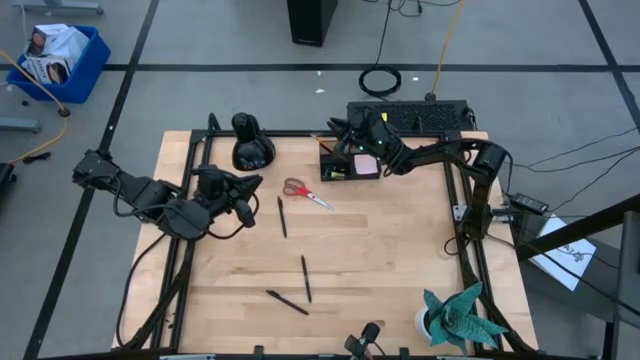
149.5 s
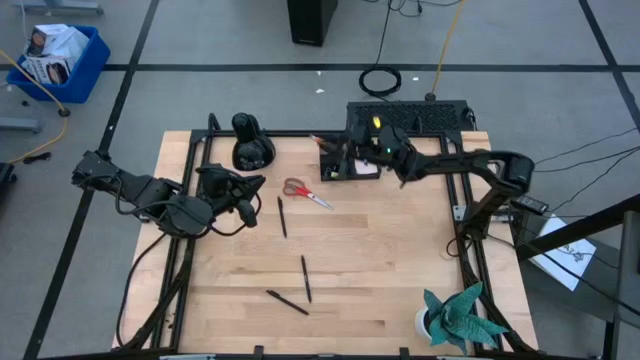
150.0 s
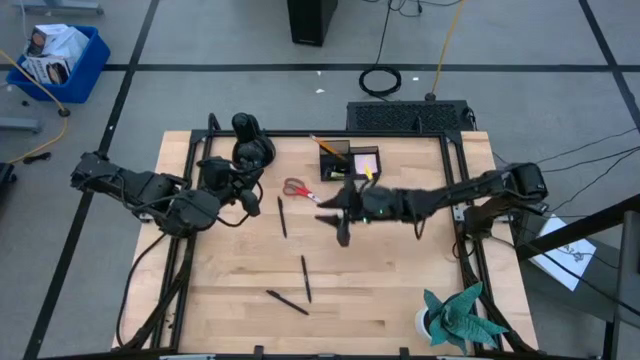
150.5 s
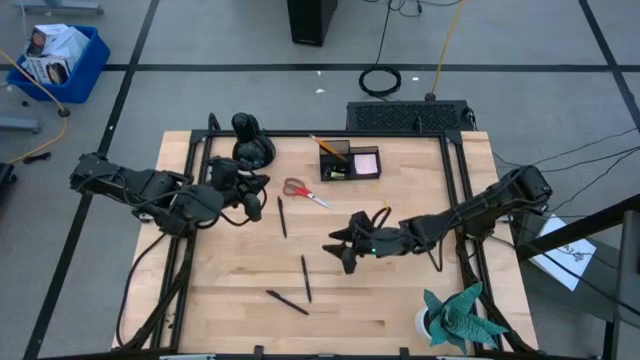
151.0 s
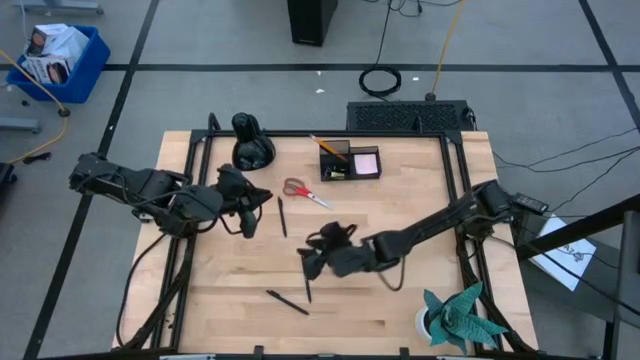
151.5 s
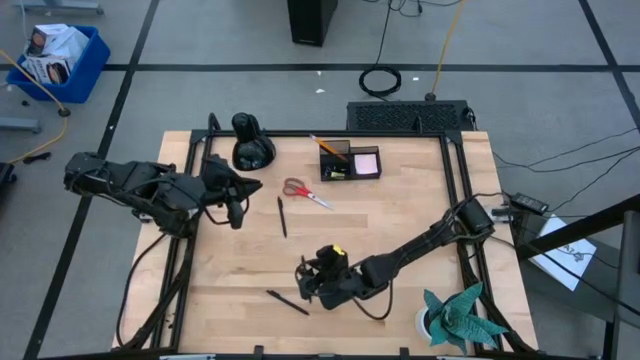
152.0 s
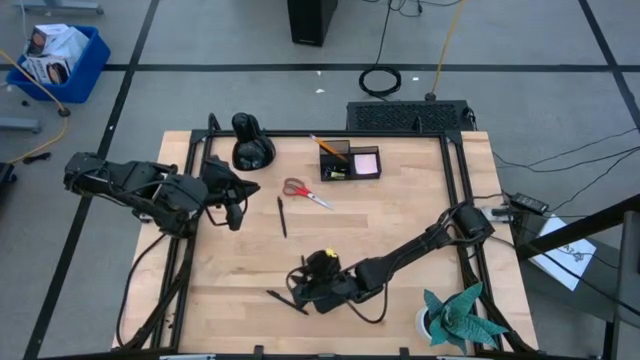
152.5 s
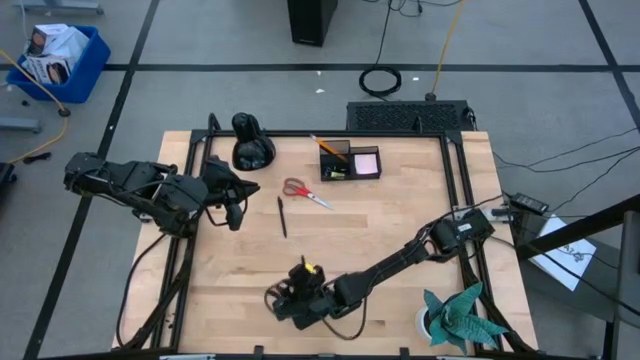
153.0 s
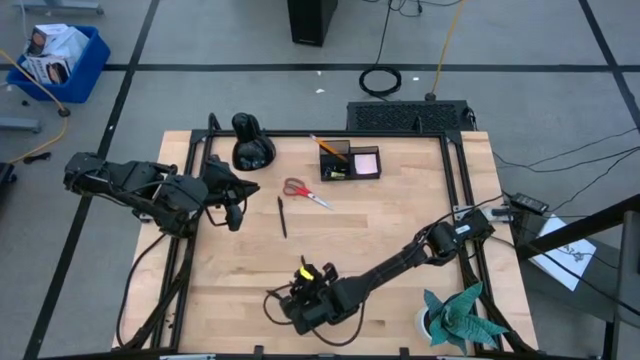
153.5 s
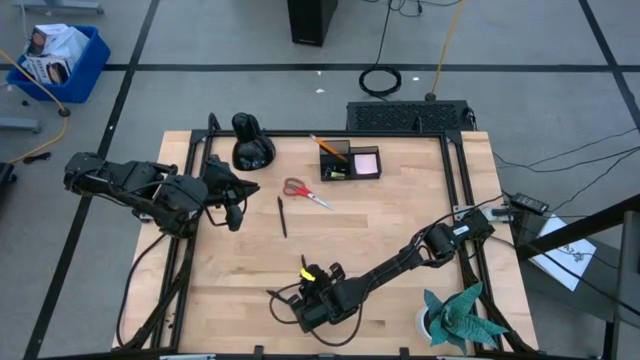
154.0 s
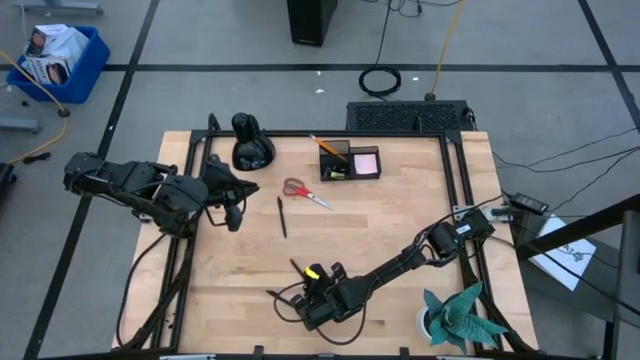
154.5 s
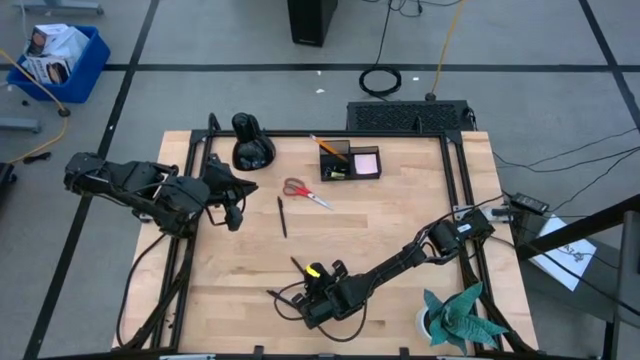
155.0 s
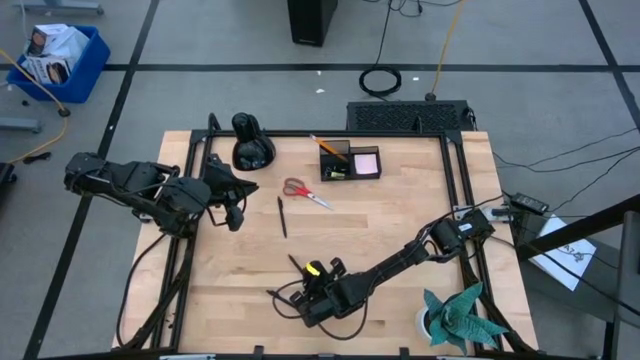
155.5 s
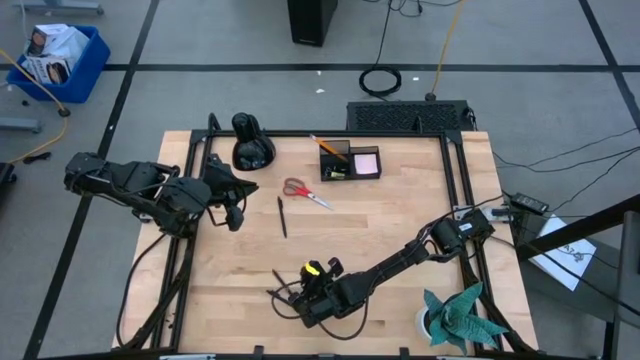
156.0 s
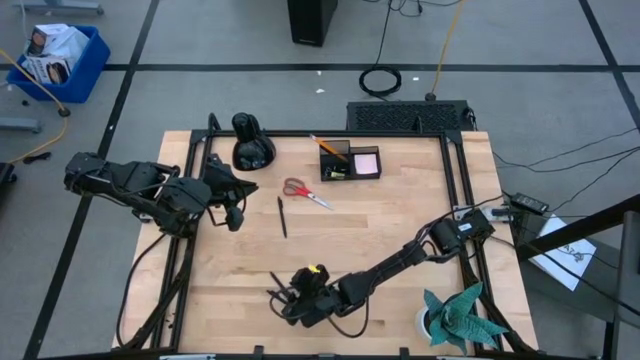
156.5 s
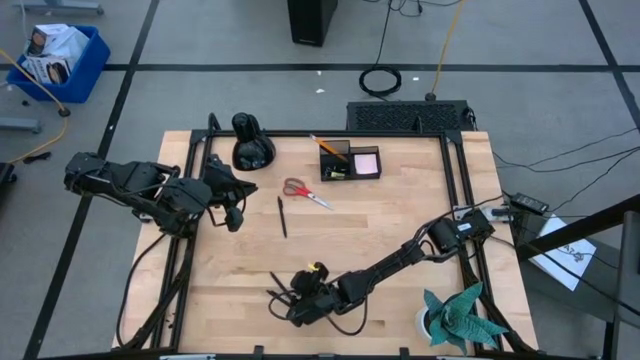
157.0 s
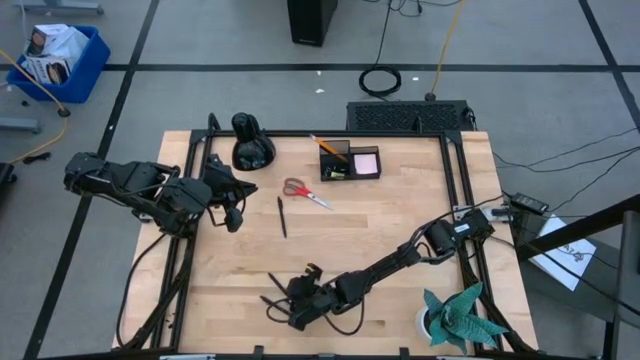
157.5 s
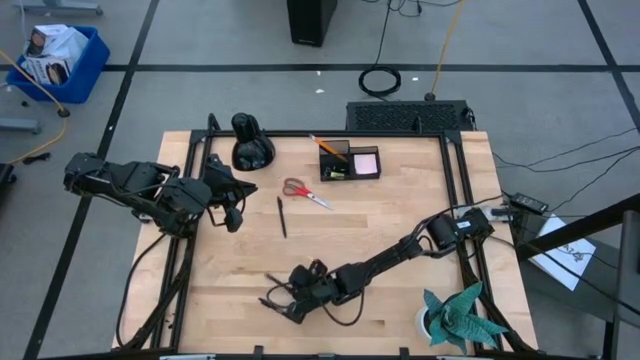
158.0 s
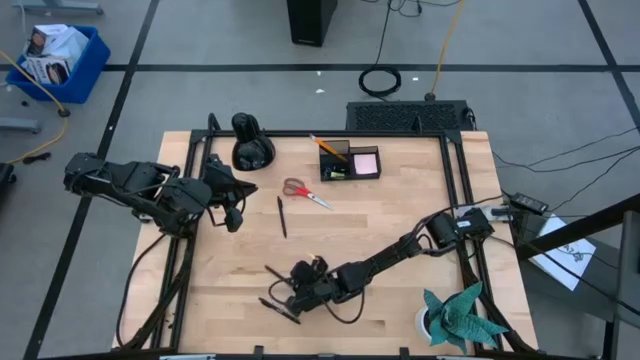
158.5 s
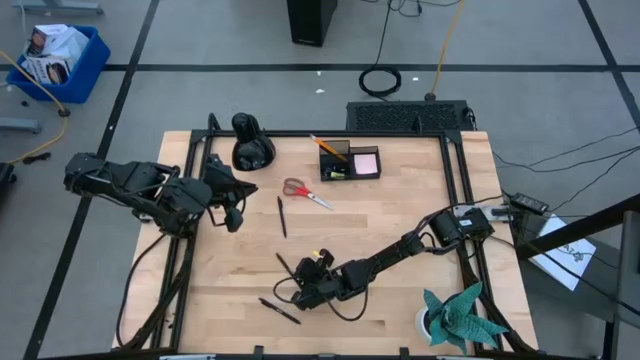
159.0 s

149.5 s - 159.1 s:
Task: Pick and place office supplies into organizer
Put the black pen into the black desk organizer

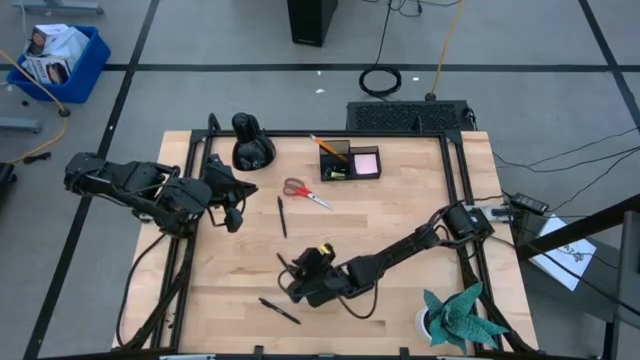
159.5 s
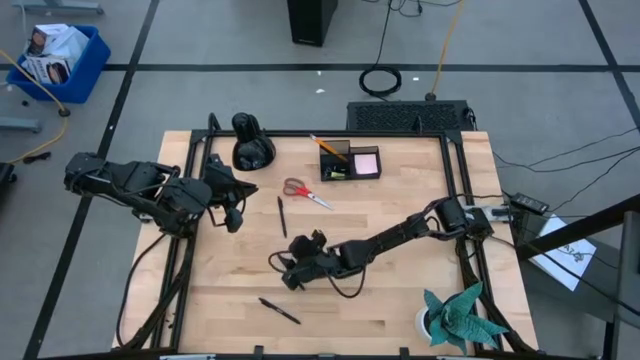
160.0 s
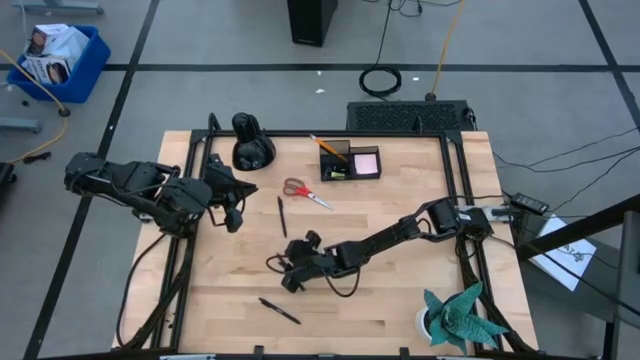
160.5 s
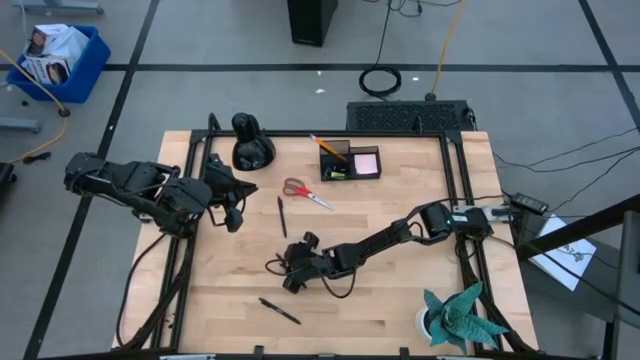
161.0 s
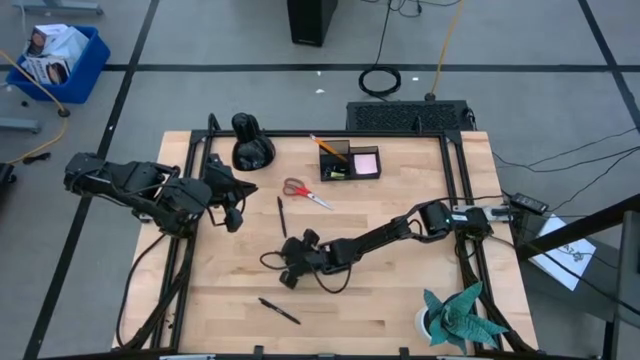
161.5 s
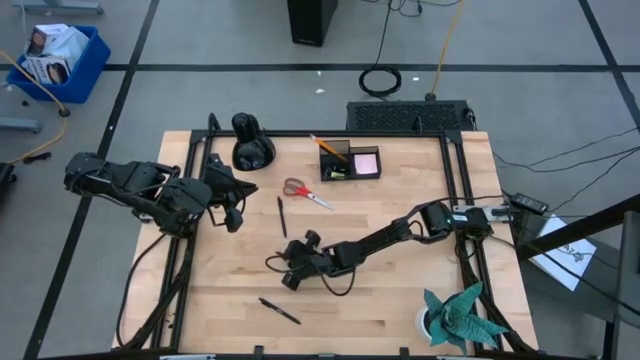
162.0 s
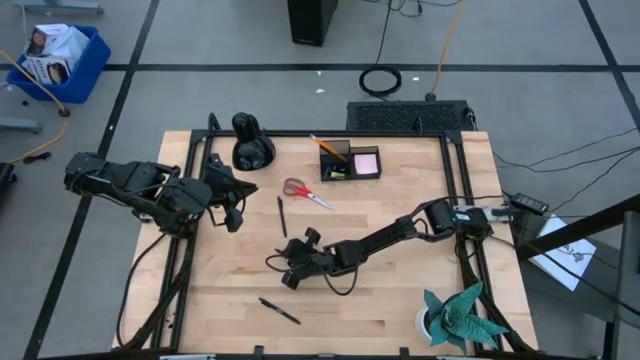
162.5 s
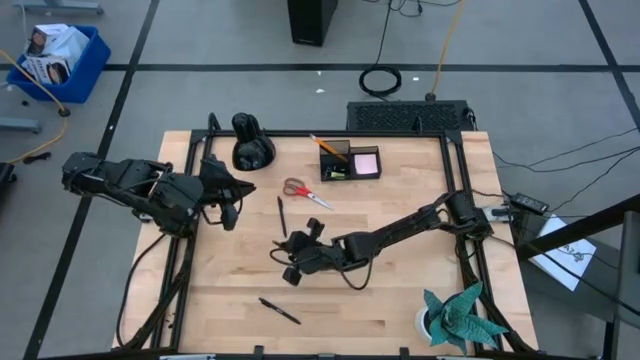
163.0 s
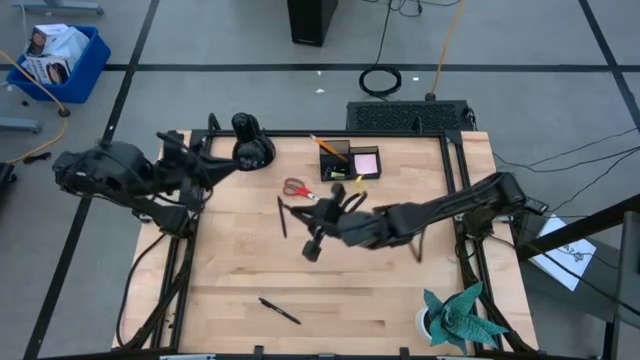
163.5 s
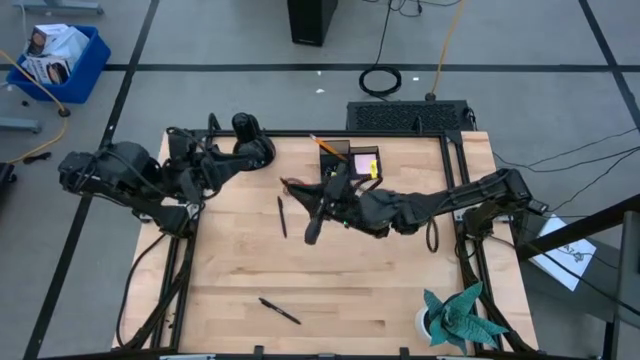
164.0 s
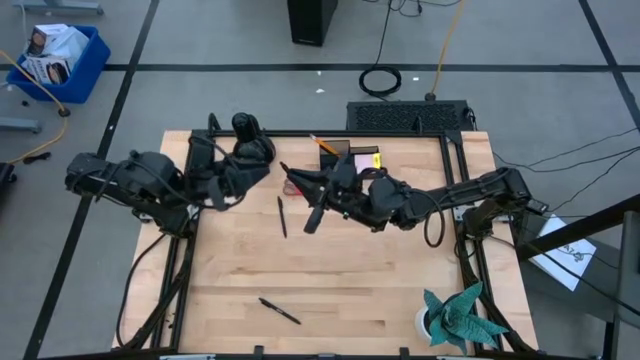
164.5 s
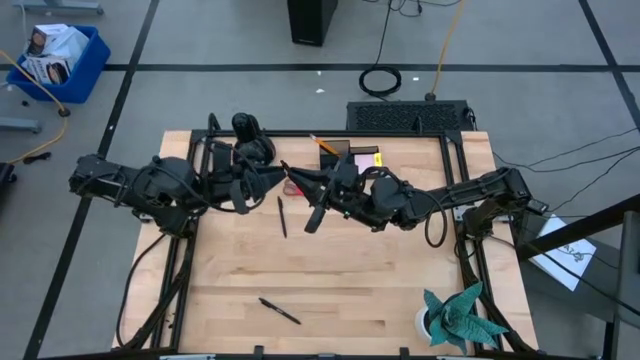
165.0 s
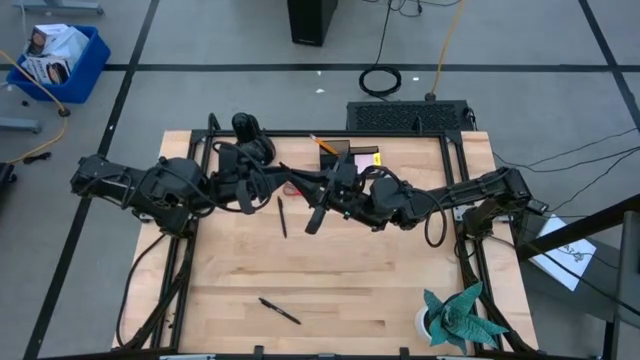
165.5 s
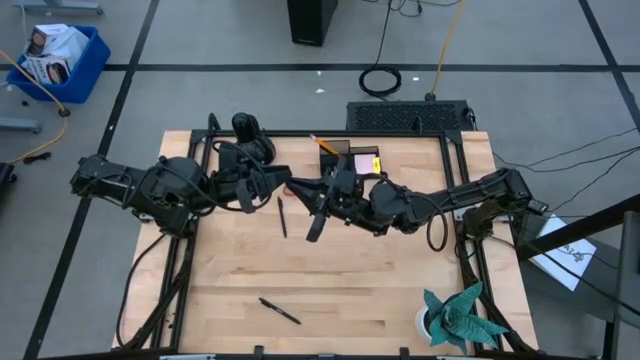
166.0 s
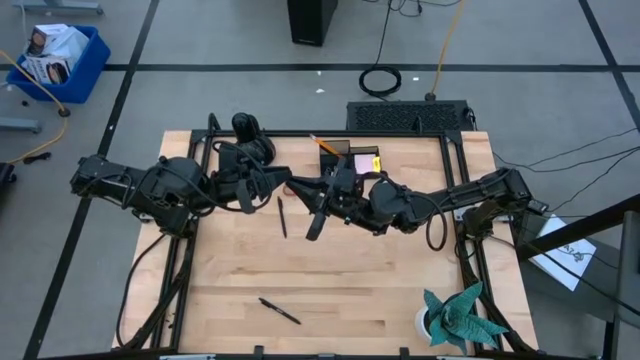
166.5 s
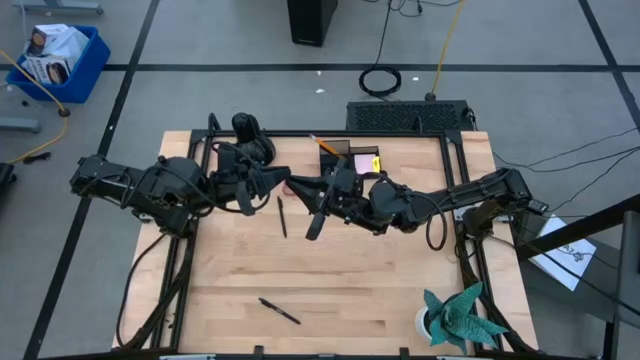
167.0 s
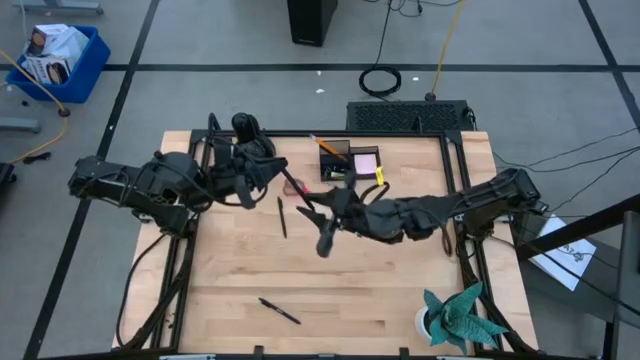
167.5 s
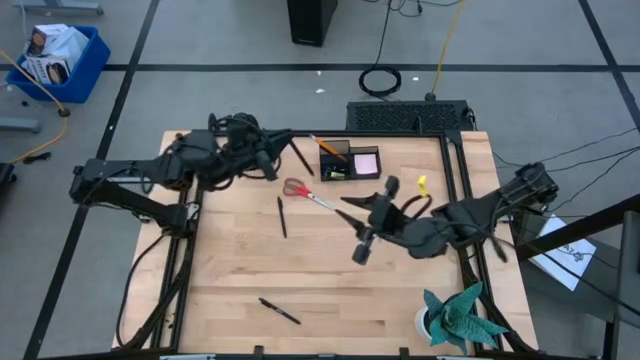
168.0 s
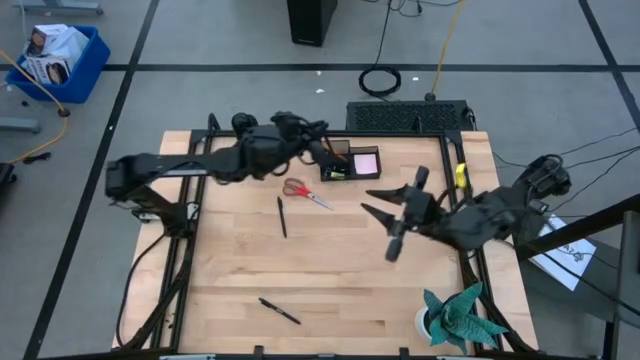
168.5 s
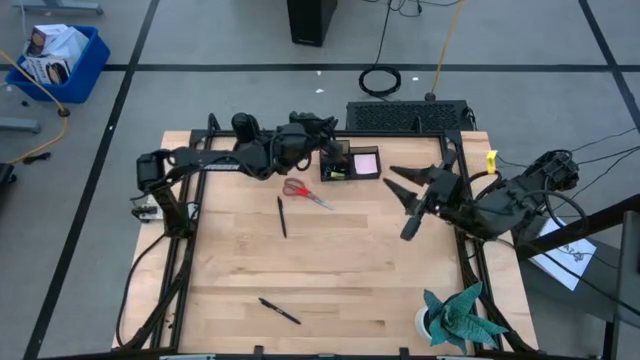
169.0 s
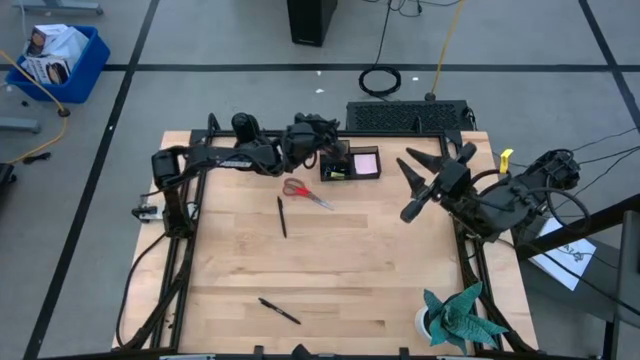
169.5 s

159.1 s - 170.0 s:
Put the black pen into the black desk organizer

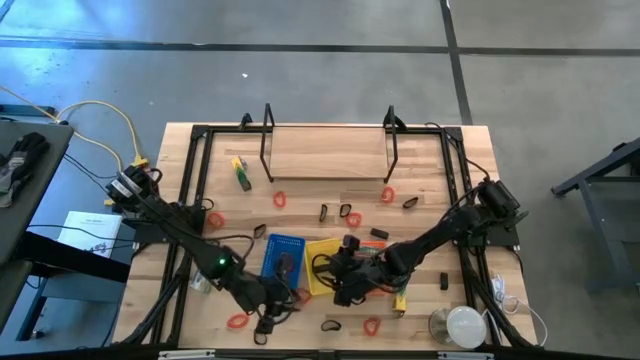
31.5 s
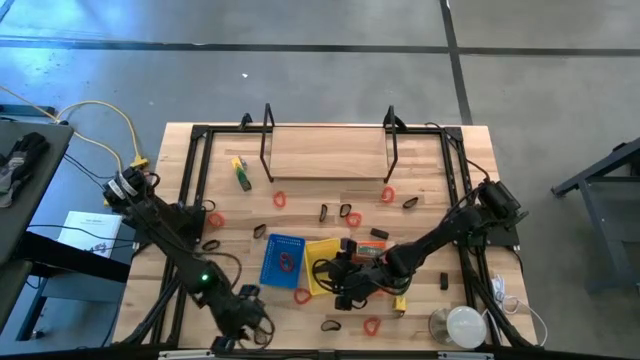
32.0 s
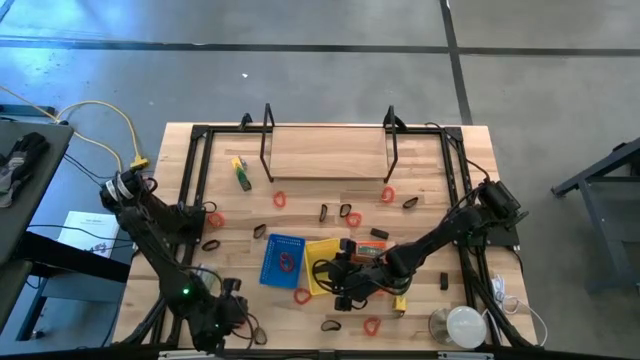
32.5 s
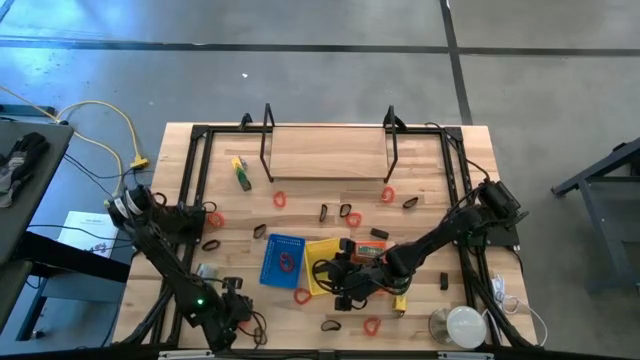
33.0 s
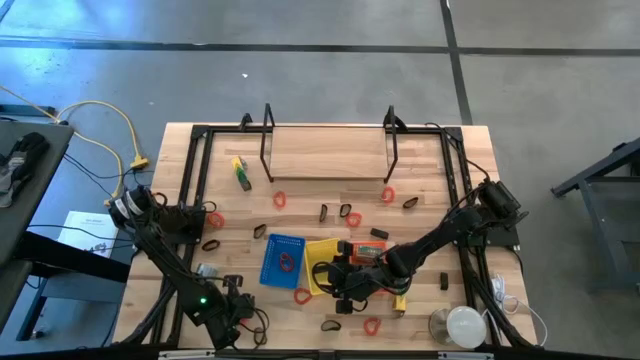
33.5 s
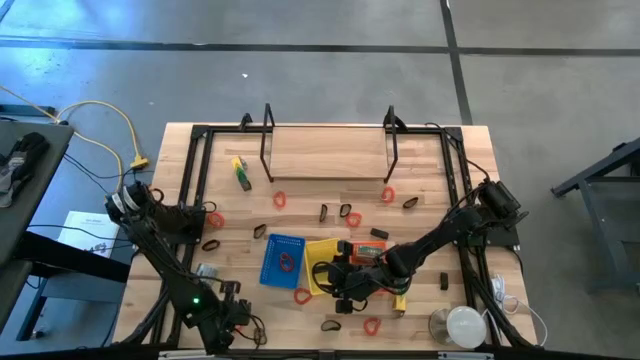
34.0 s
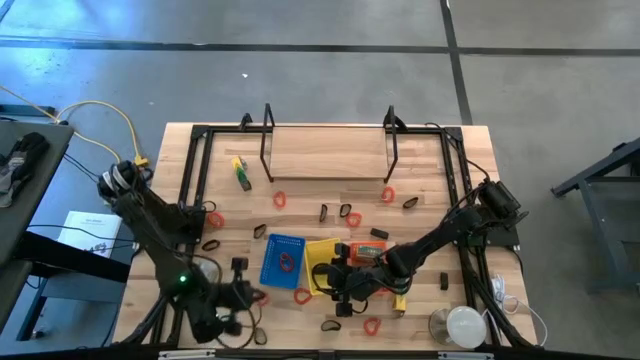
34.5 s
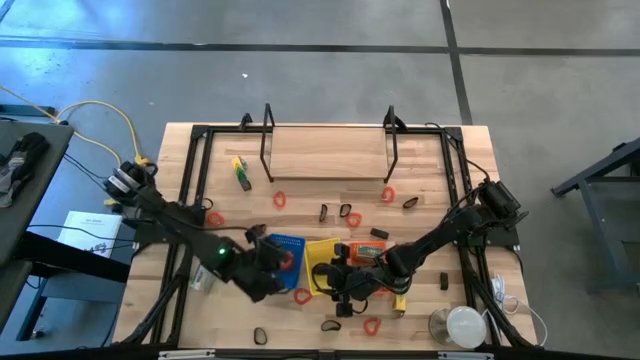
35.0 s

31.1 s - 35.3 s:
Task: Pick & Place Office Desk Supplies
Put the orange spring keychain into the blue basket
